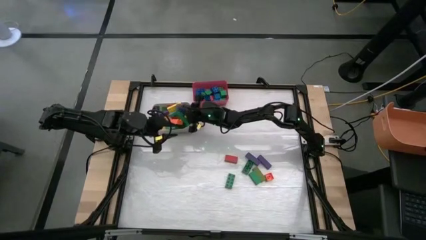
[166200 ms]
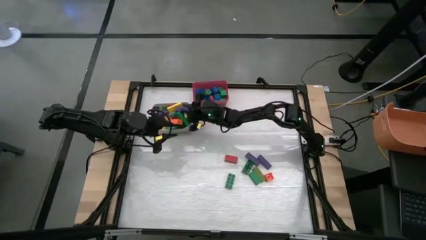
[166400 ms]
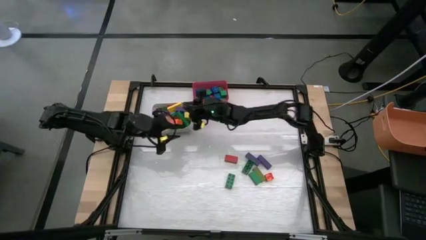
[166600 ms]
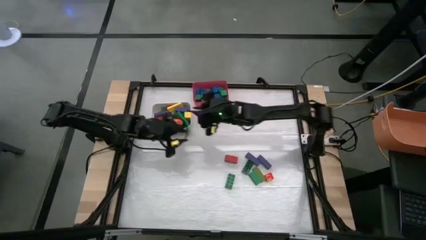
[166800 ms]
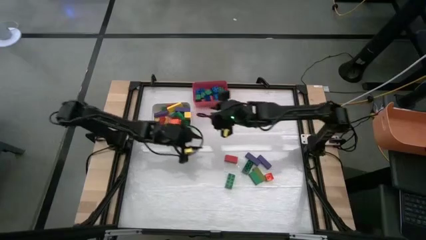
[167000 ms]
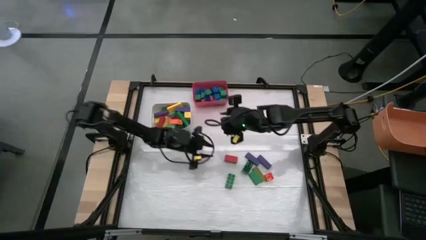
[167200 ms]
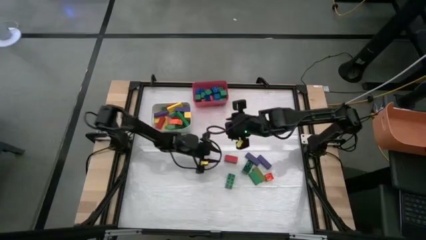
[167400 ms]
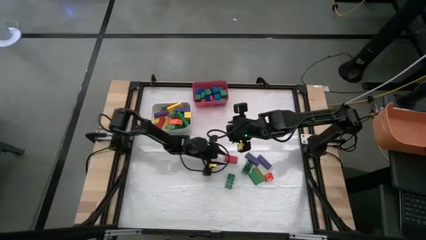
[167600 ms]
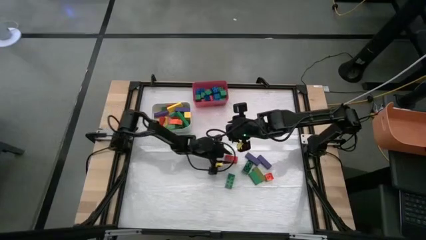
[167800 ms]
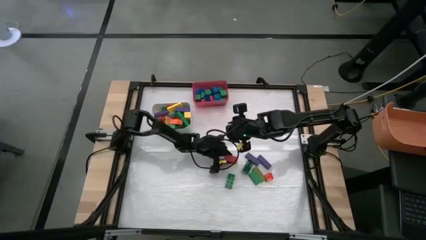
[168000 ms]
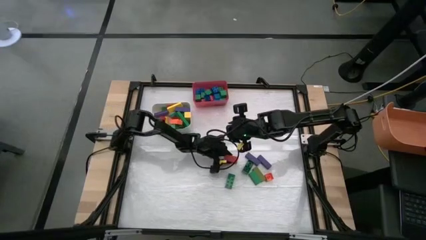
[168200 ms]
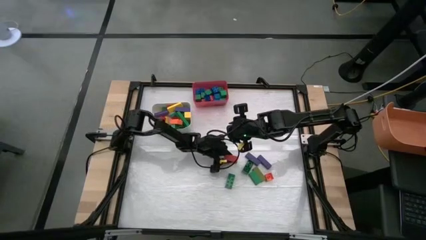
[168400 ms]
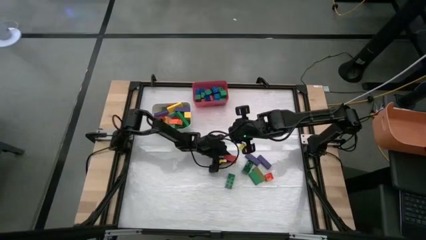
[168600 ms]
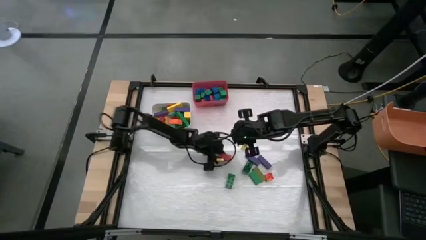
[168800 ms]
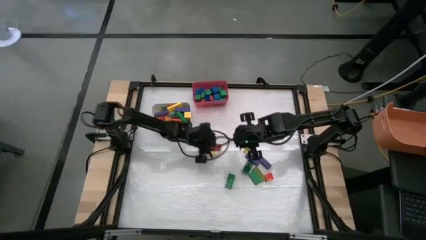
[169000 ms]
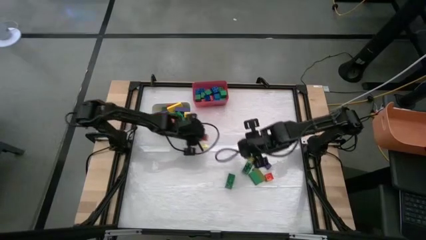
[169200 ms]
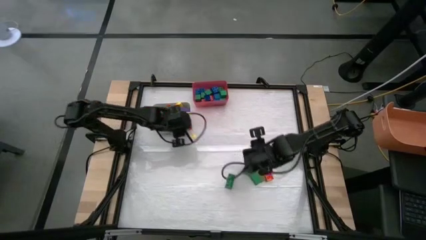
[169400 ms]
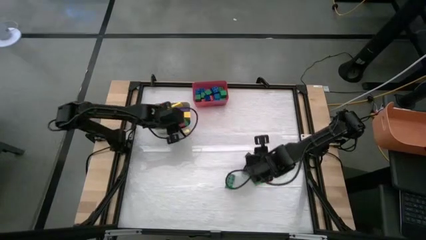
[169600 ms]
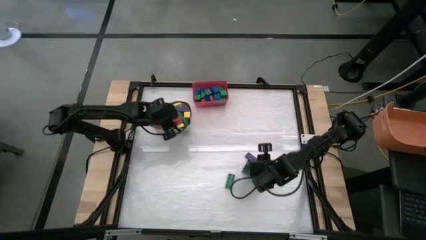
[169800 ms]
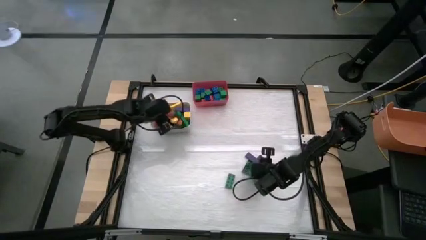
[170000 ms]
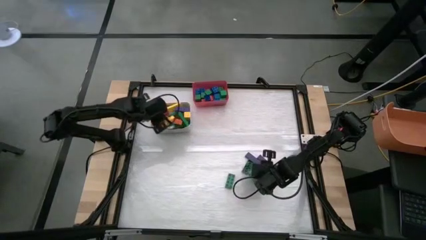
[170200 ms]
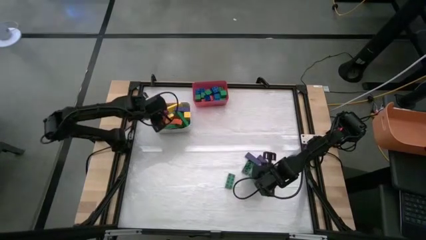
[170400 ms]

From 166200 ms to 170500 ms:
Task: Sort blocks by size
Put the large orange wooden block into the white bin

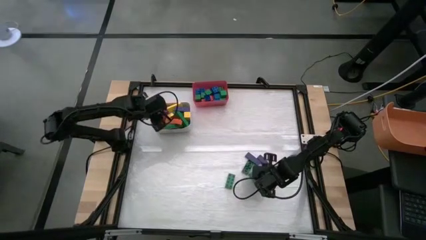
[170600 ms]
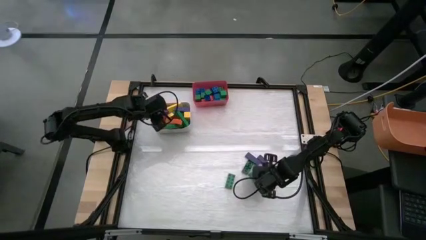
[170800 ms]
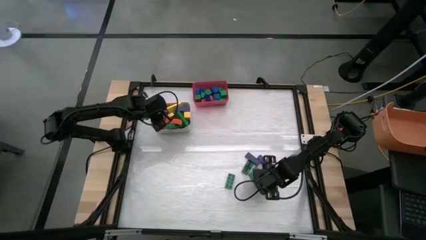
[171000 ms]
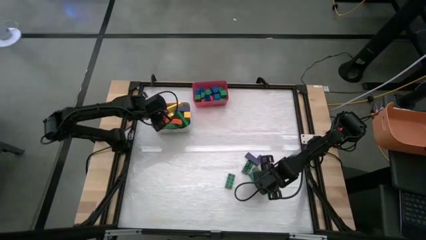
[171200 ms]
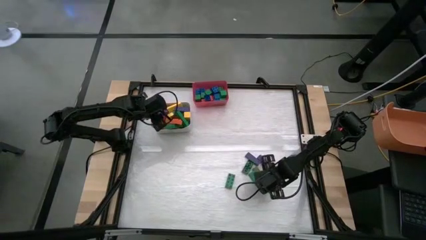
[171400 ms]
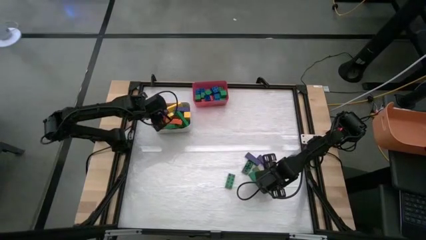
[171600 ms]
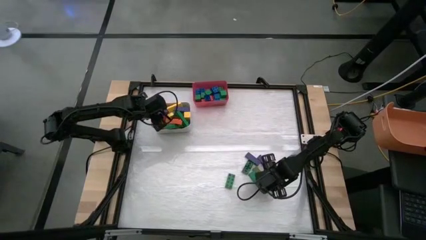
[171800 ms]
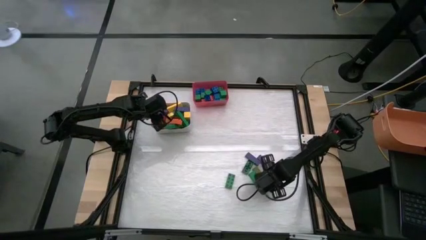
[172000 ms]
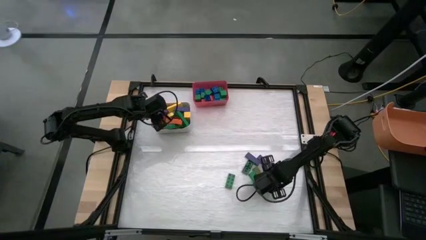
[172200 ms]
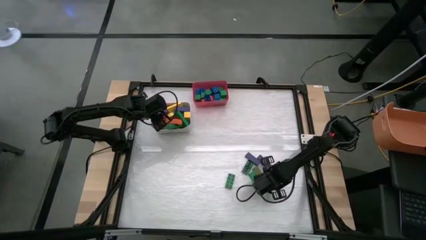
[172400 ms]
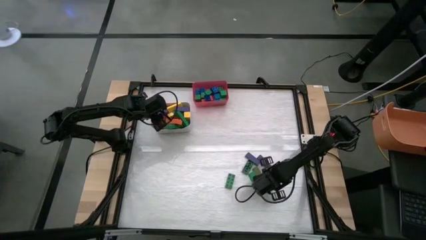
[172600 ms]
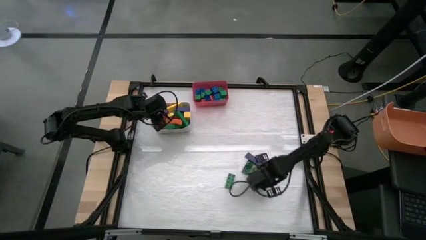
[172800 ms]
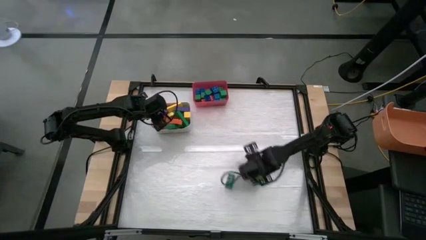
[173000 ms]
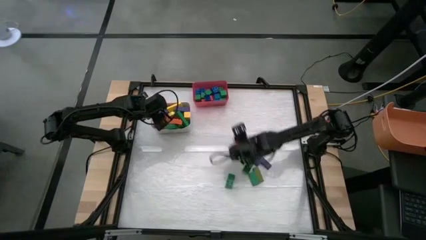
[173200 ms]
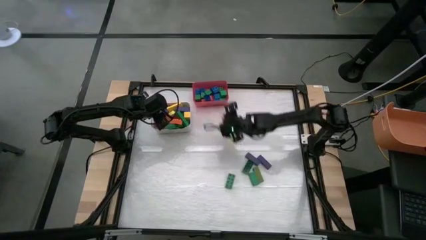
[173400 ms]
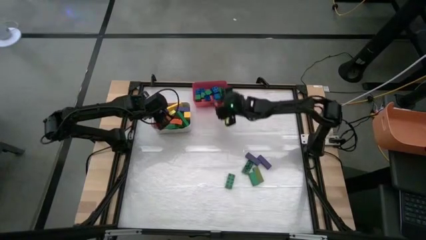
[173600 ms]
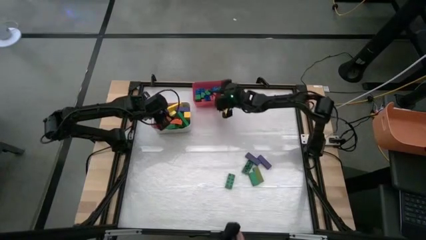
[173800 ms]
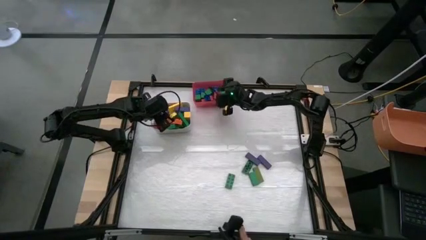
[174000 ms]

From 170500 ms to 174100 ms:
Put the small orange game piece into the white bin

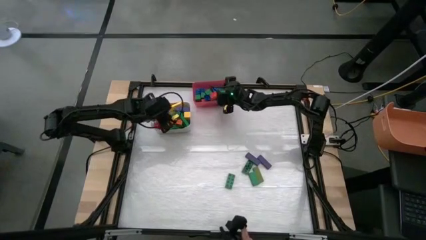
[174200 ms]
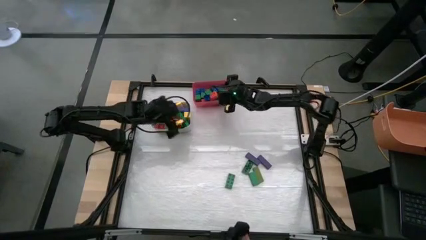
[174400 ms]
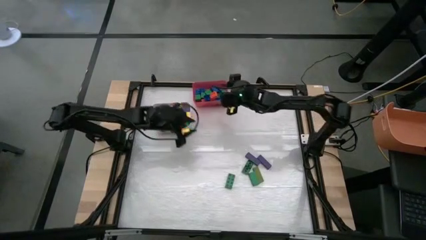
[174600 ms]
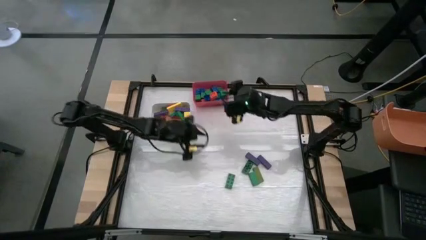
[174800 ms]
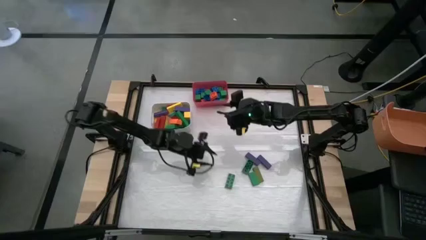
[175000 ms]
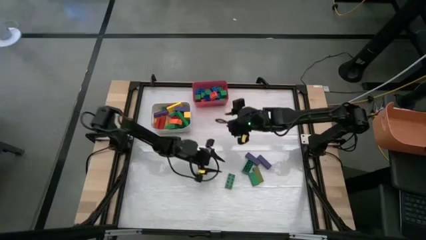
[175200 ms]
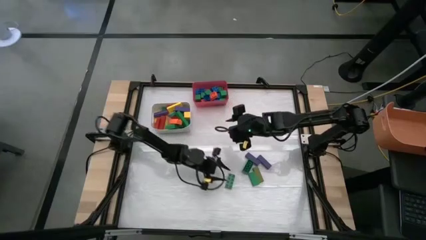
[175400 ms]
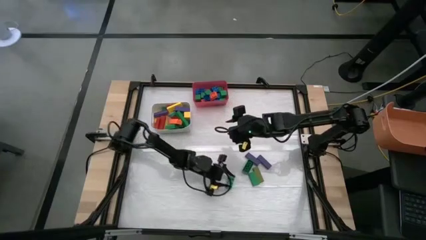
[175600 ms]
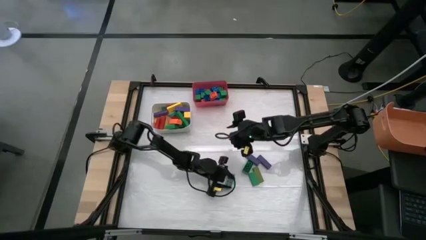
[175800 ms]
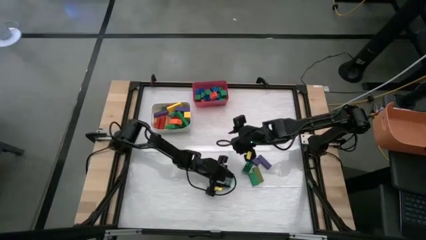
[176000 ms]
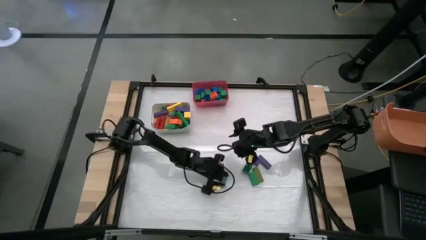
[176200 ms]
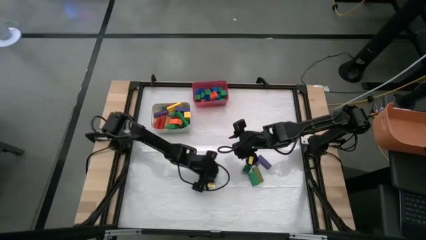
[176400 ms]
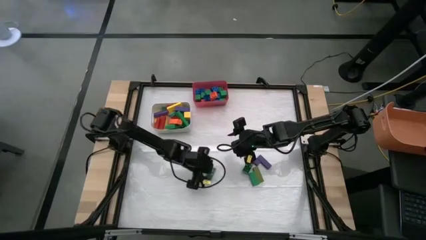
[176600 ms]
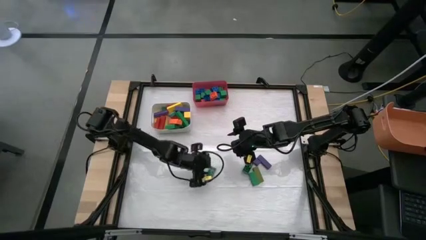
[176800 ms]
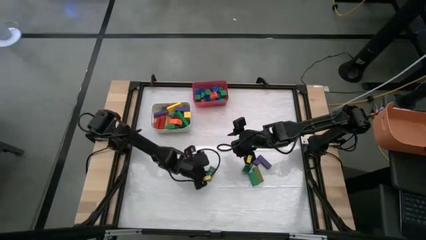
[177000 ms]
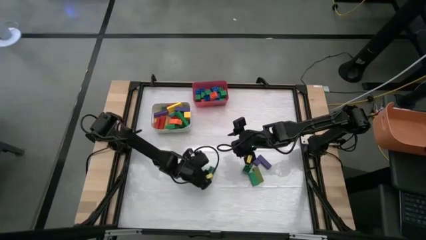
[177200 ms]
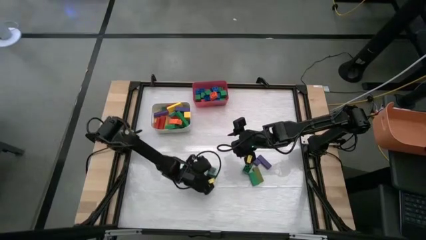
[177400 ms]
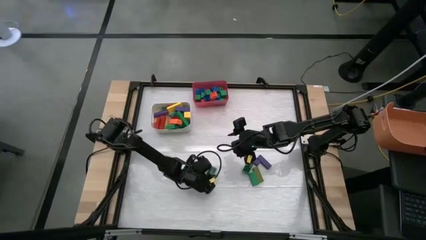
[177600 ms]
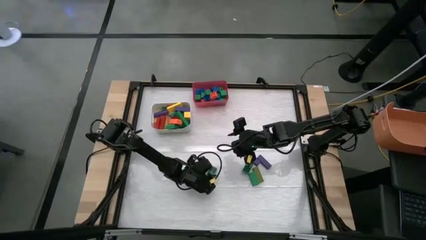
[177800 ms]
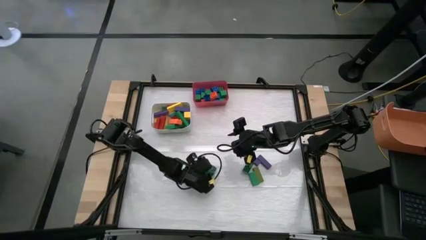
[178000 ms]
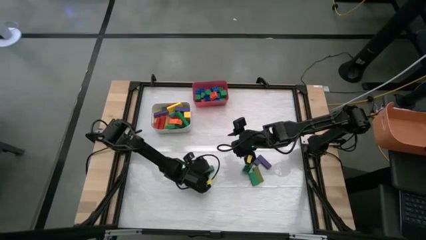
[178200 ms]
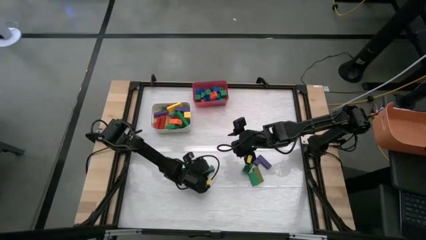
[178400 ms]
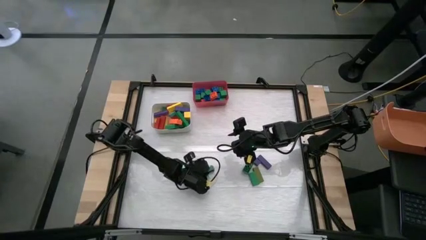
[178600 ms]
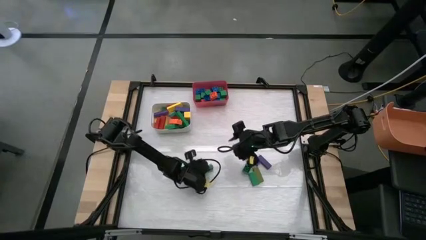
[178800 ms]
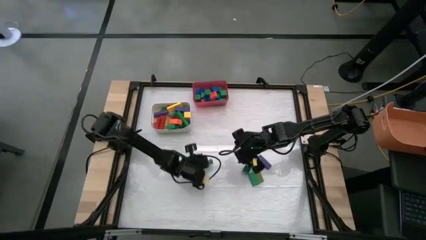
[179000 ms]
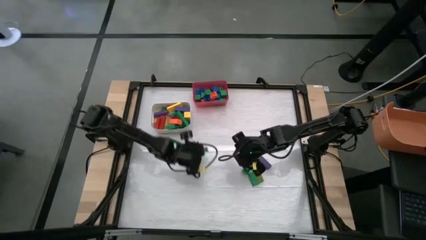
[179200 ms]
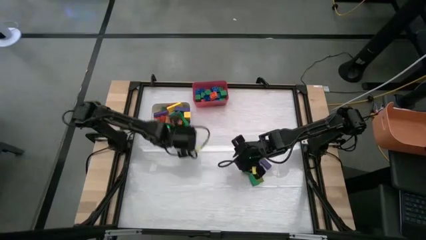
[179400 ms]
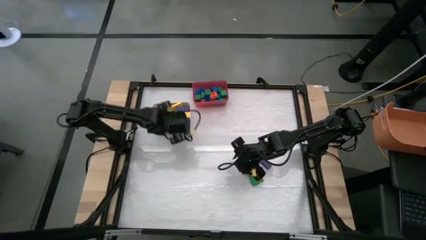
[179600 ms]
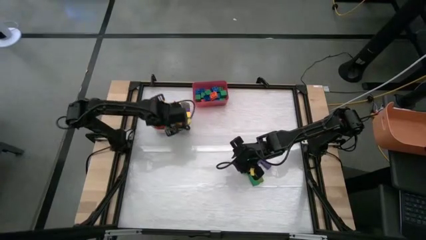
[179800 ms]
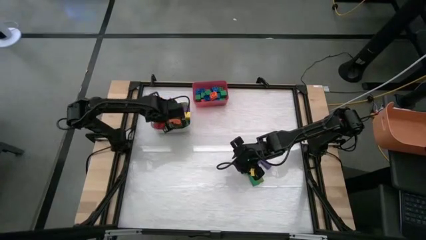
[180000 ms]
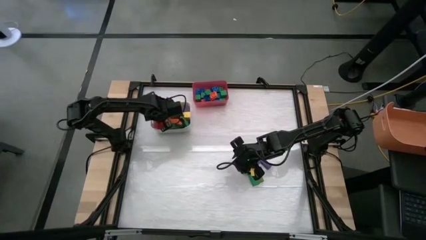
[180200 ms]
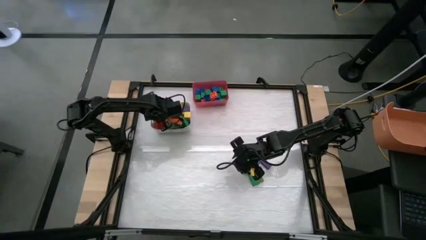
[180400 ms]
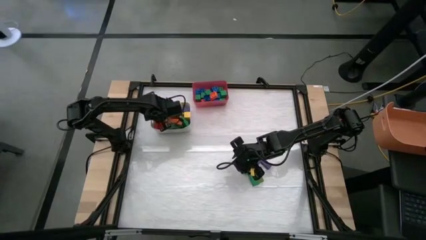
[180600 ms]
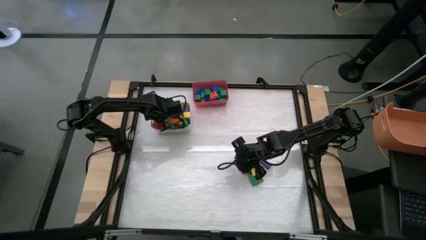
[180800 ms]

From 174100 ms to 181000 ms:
Put the large green game piece into the white bin

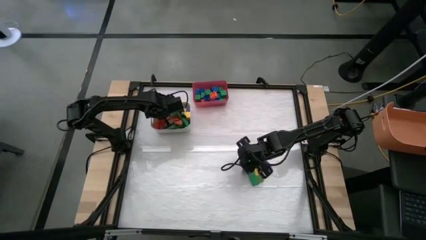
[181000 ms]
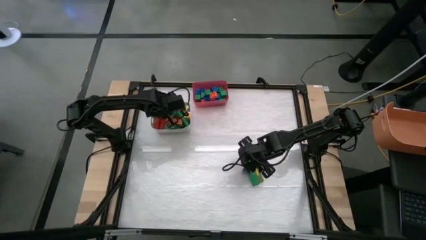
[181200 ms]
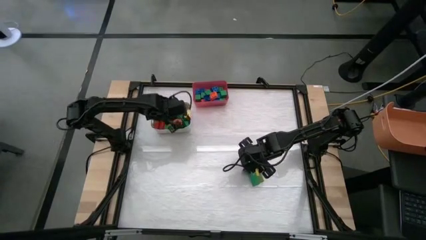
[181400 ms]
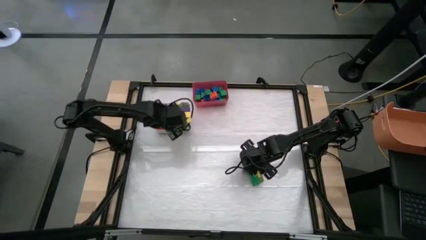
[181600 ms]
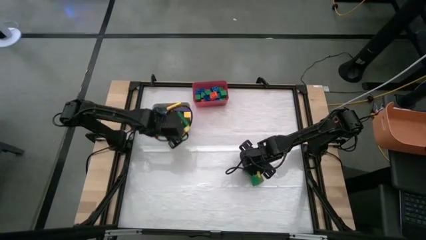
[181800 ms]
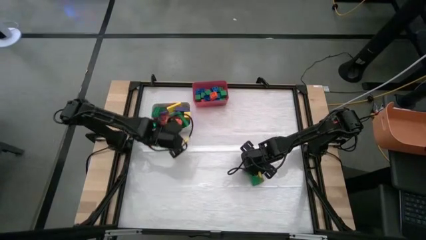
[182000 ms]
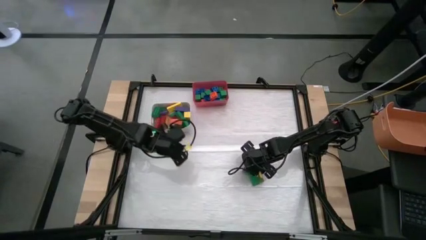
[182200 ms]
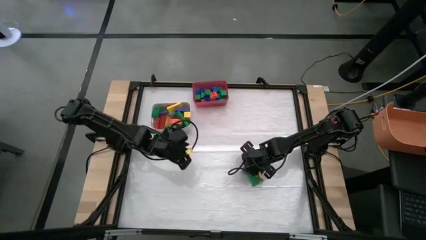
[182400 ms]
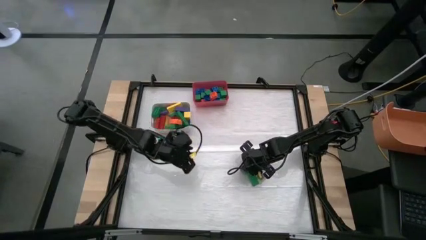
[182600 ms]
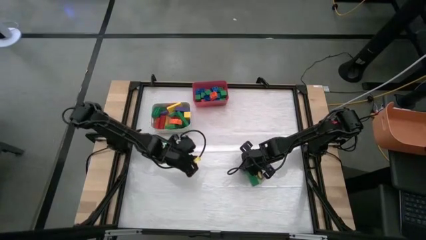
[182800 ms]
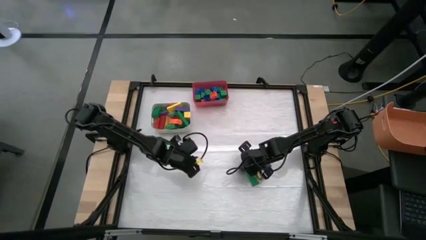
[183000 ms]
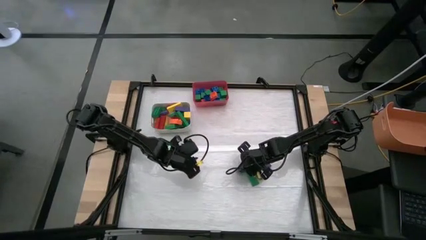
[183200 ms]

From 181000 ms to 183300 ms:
Put the large green game piece into the white bin
